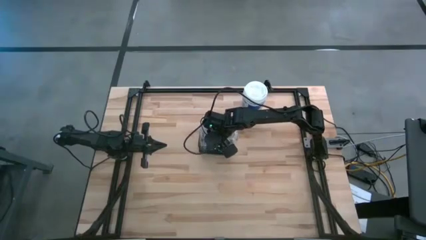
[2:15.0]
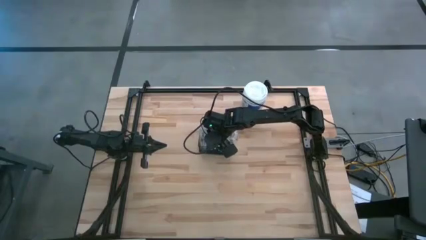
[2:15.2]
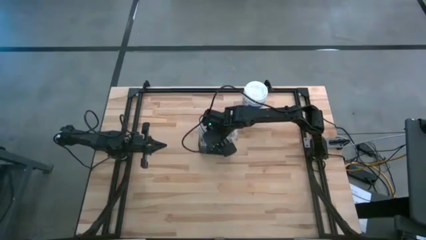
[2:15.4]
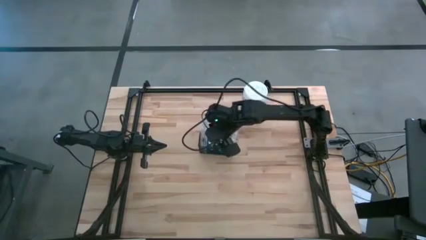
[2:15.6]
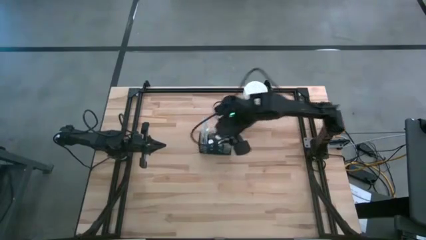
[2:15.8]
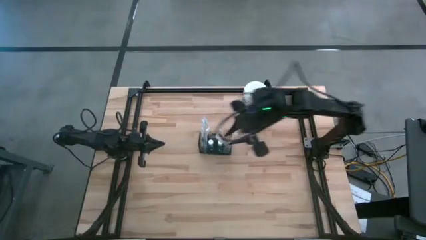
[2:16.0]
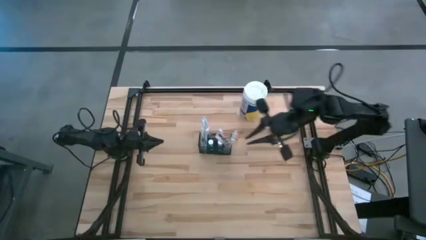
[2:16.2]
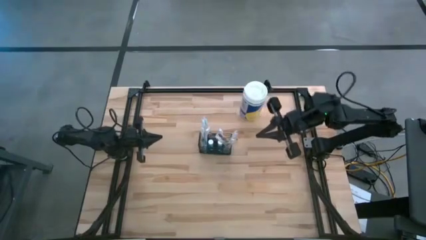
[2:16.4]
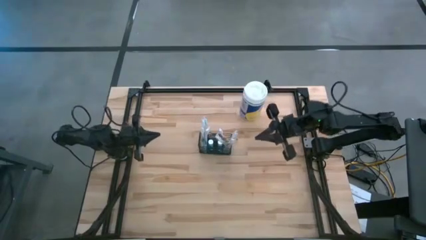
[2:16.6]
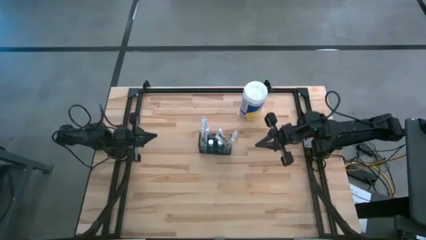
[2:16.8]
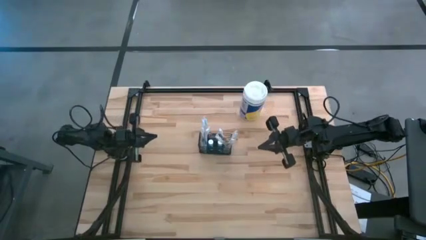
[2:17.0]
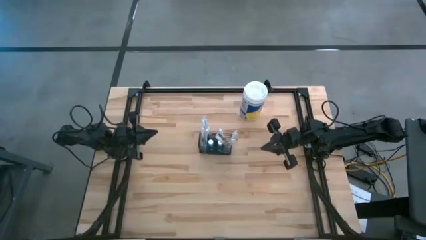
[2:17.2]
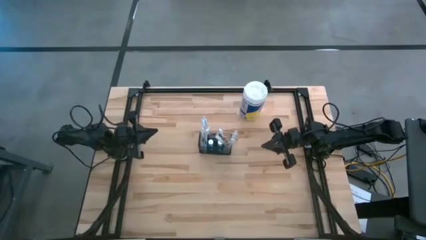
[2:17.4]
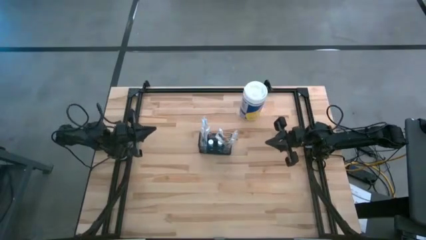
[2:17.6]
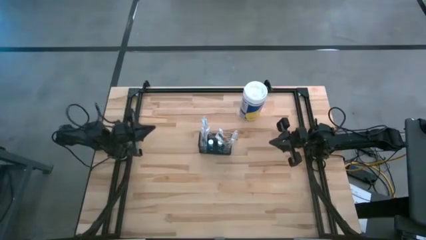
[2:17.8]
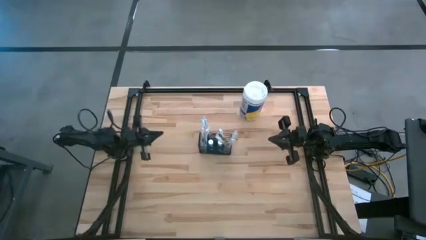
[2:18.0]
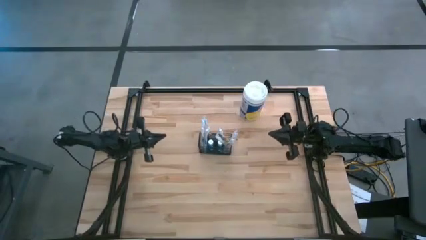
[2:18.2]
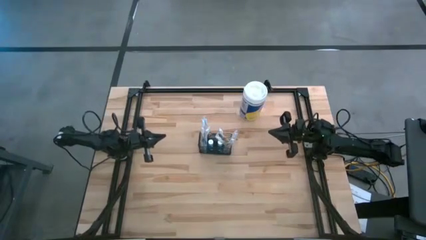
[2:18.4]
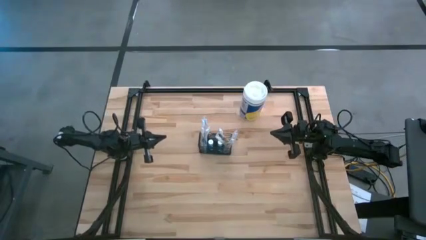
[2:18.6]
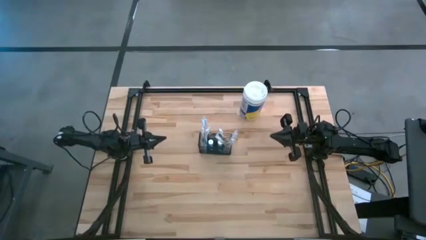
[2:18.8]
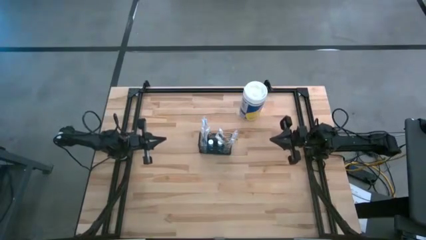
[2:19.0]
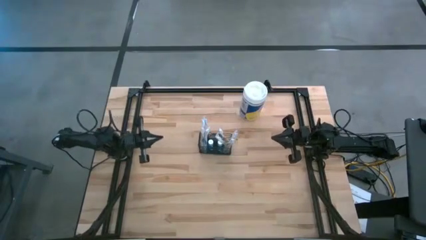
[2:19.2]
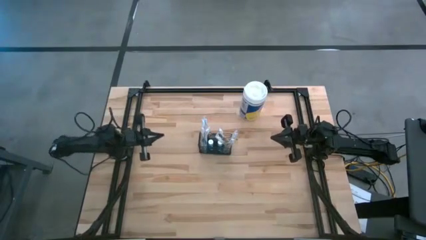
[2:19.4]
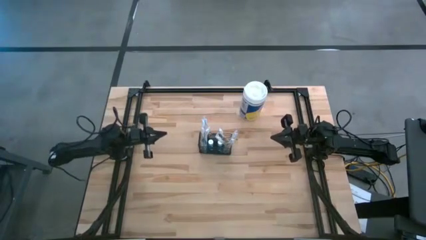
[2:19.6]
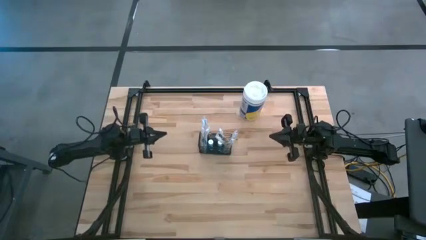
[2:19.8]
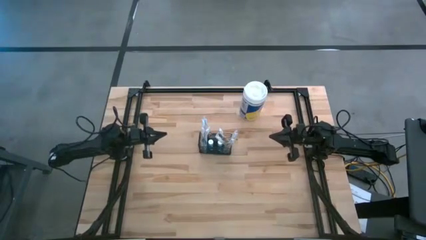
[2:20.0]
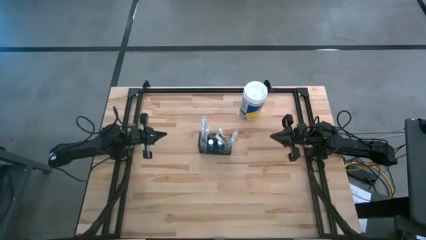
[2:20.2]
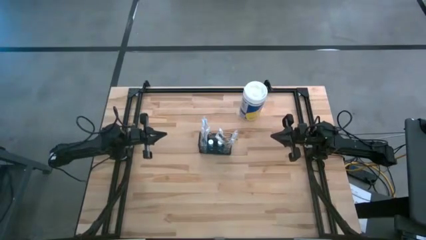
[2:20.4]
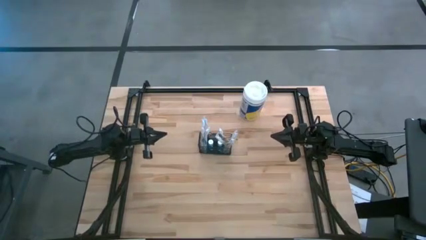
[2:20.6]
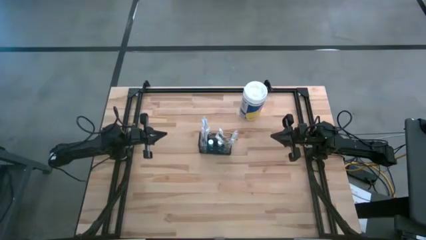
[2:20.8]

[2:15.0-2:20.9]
Task: Pick & Place toothbrushing station
Return to Home Position

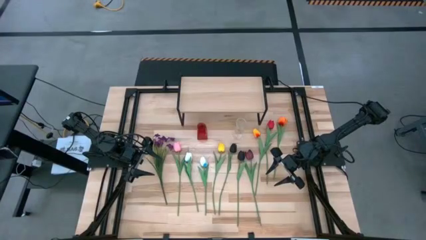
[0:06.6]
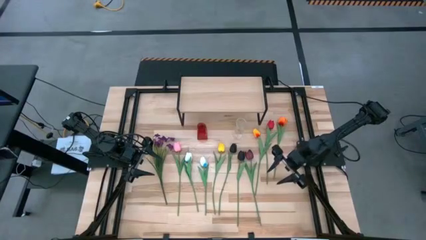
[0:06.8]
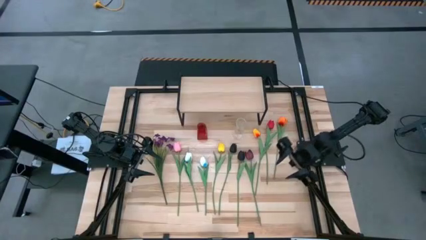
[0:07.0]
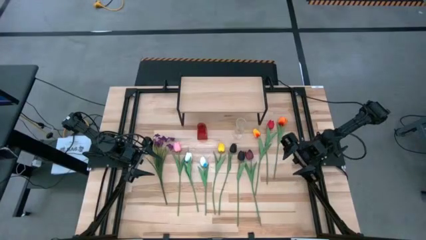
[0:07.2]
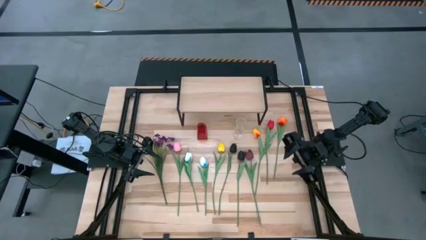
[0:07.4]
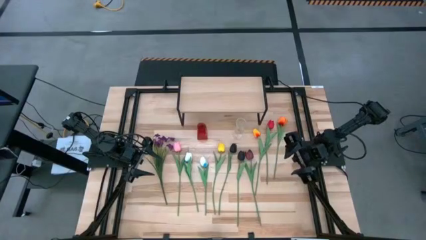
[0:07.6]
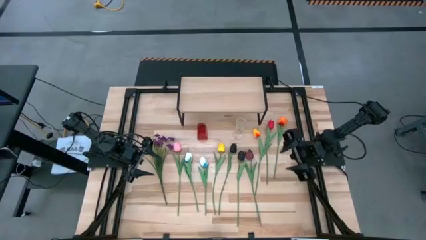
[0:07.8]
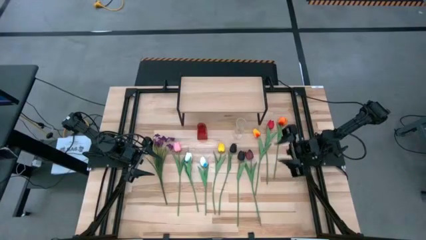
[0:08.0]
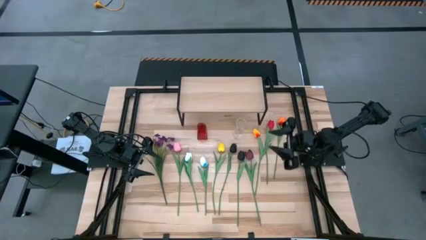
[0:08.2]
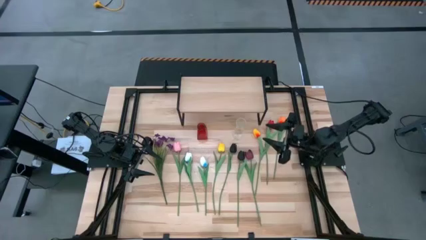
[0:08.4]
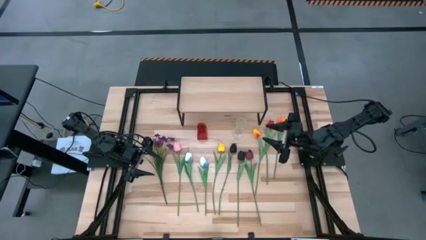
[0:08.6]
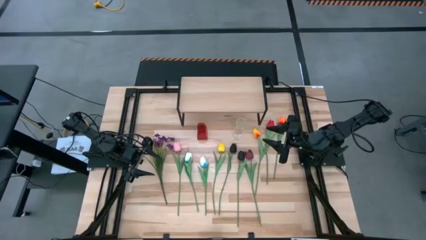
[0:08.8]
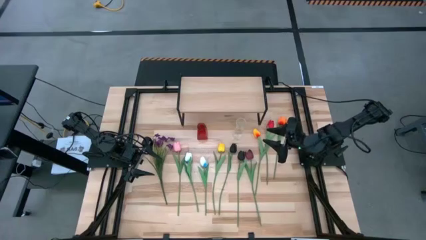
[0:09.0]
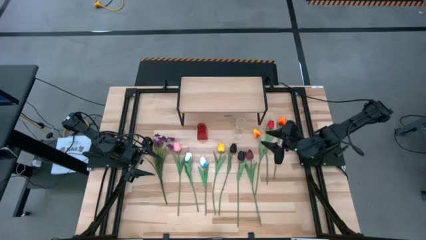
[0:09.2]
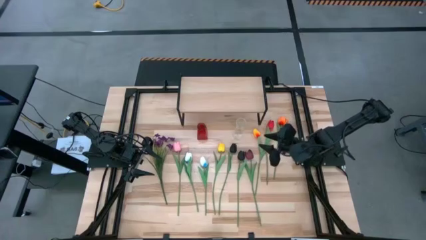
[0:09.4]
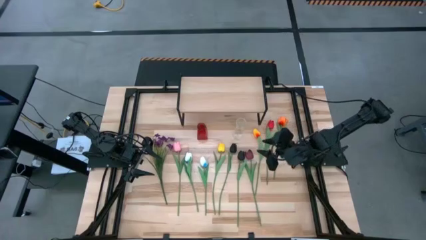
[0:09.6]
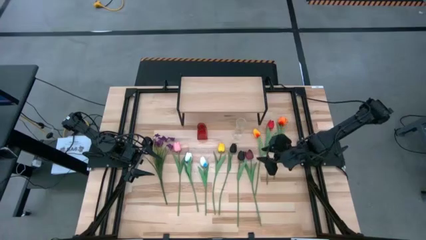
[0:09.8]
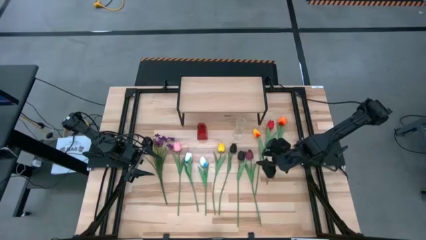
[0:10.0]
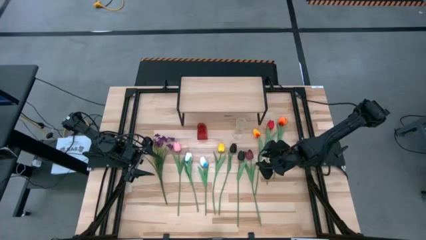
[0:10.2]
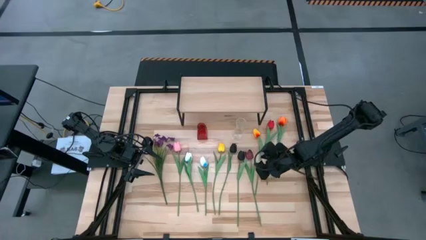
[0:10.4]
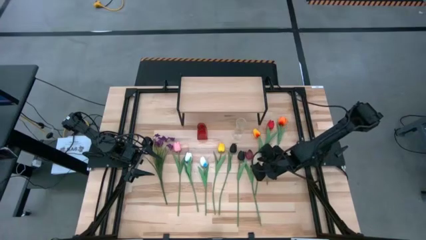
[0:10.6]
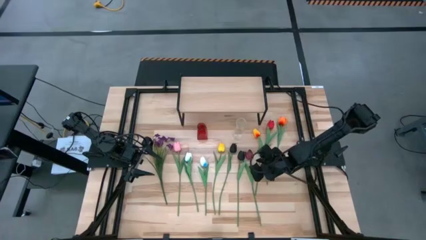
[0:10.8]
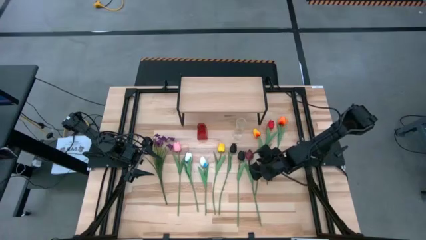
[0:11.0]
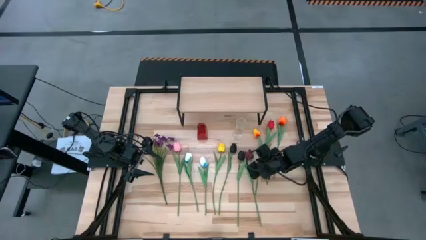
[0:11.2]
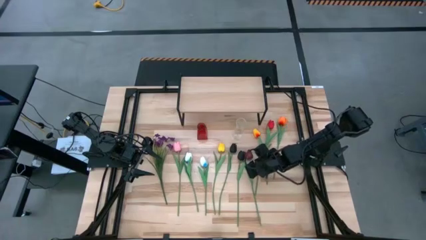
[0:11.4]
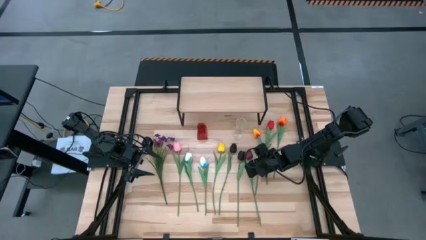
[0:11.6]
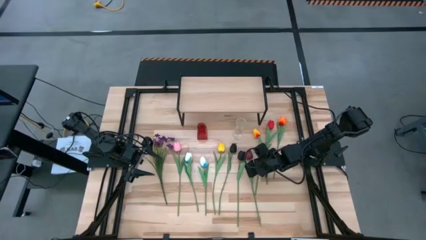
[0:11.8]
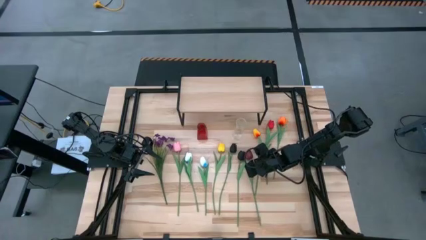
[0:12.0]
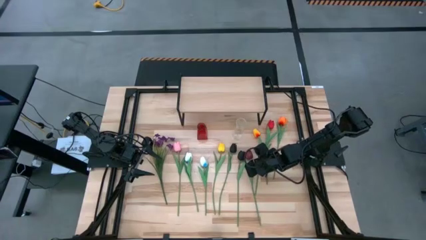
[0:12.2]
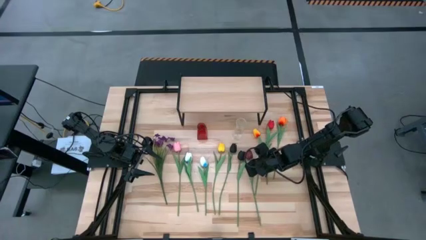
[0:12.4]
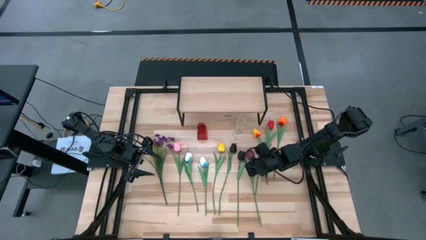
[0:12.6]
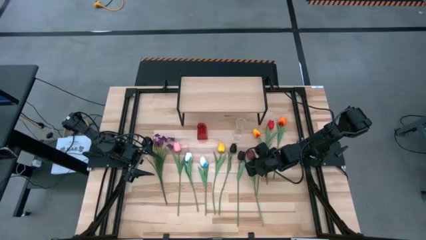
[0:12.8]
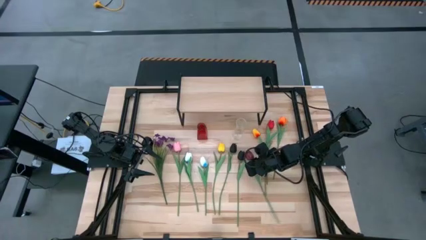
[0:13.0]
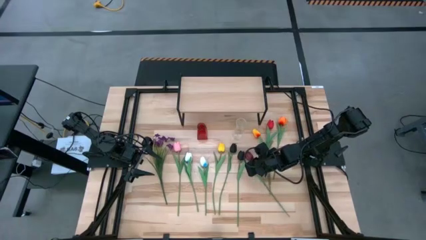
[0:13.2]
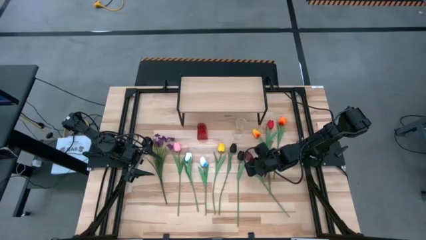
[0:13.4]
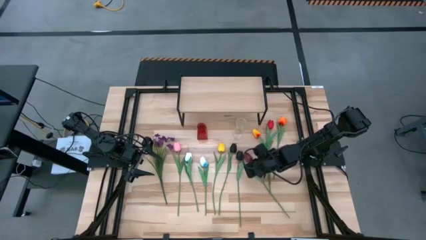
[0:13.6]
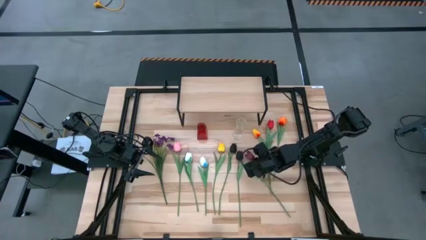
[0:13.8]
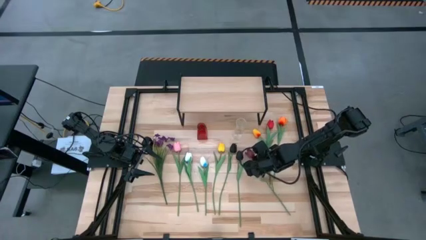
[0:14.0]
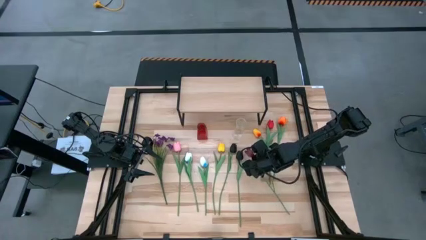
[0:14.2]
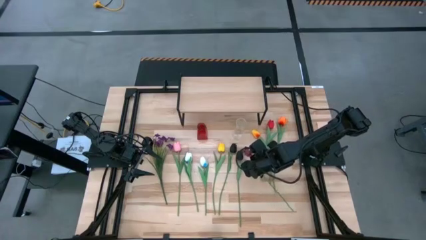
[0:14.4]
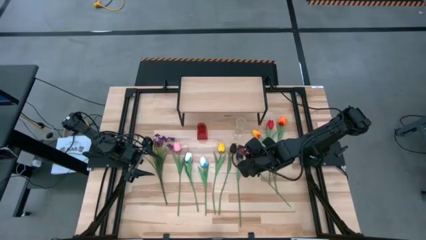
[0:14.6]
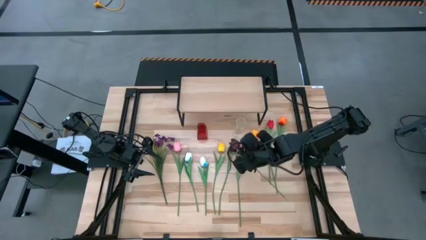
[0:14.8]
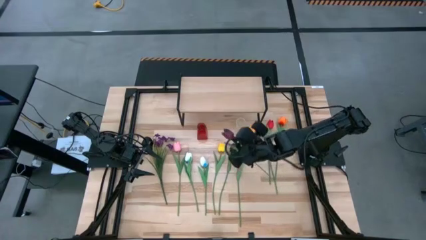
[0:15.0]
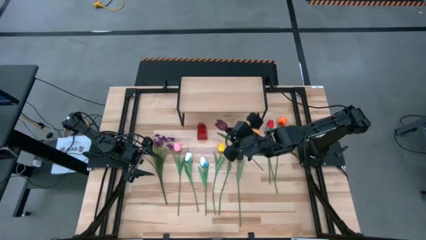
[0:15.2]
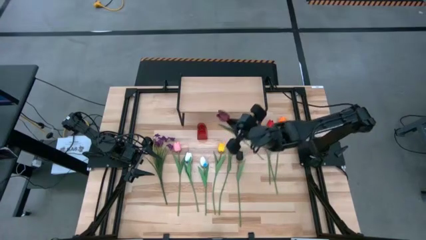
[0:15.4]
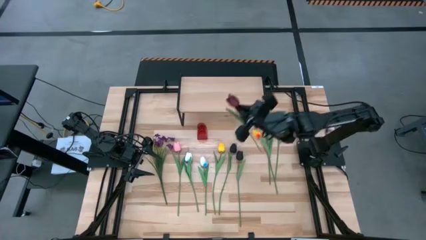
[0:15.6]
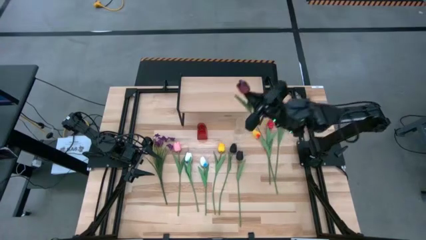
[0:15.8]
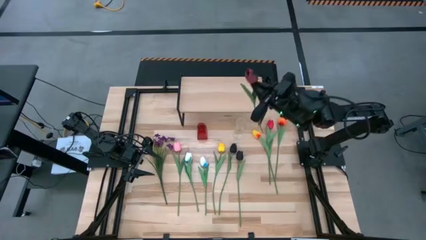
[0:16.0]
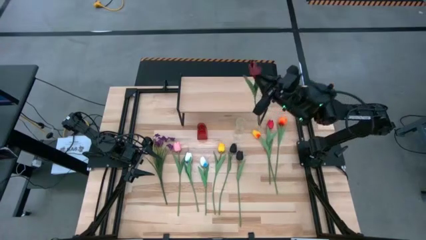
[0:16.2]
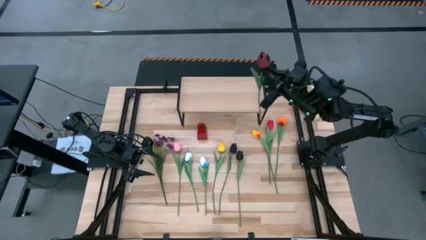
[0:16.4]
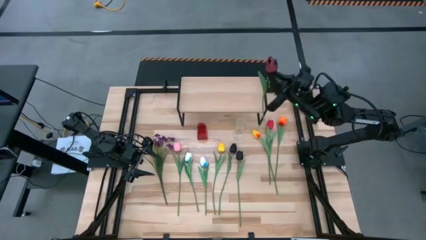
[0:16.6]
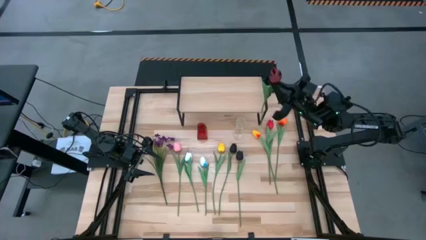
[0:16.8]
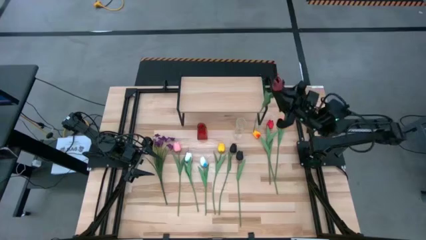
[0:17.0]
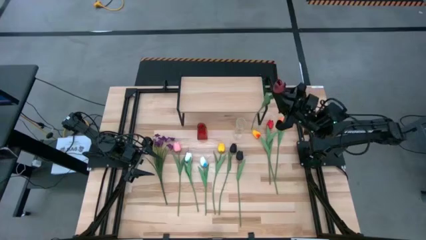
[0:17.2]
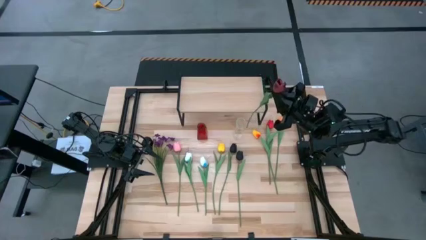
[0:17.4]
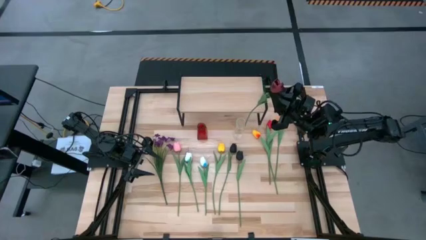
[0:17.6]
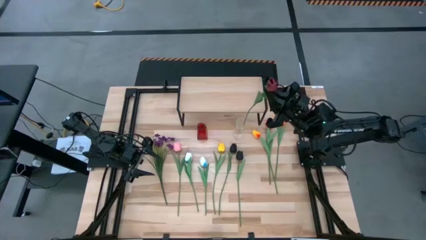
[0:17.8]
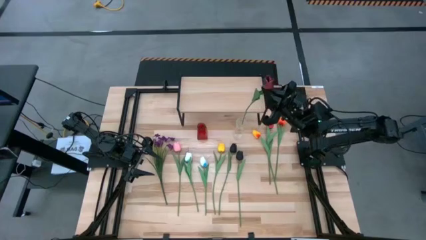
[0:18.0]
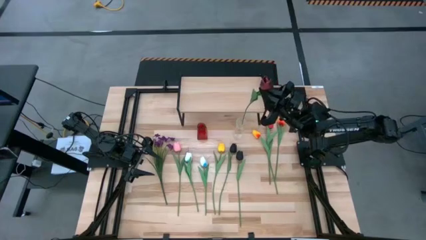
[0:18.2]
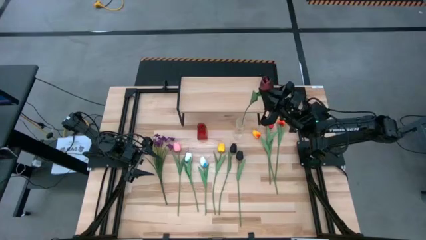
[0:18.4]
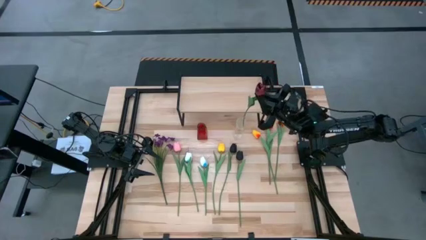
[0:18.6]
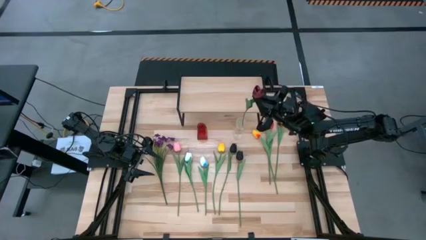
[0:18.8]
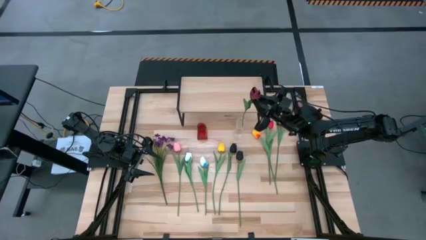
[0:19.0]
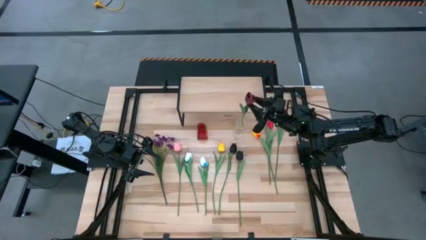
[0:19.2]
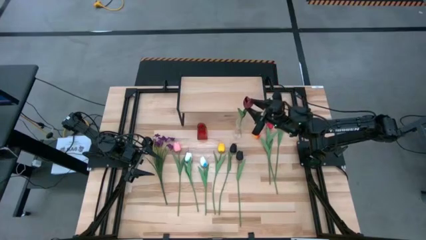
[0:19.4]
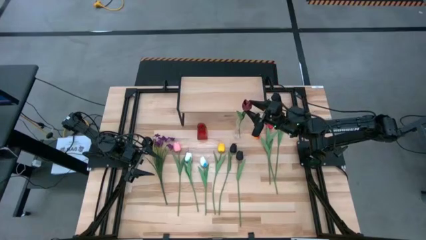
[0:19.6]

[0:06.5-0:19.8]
Task: Pick and place flowers into a vace then onto a shelf
Put the dark red flower into the transparent vase
